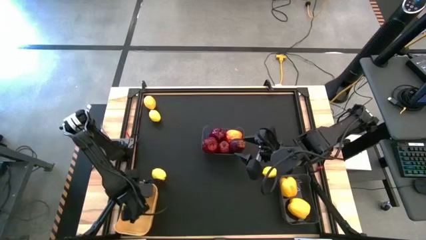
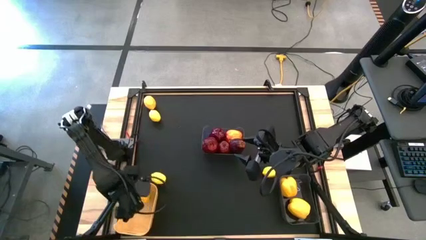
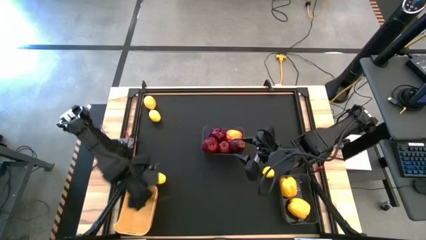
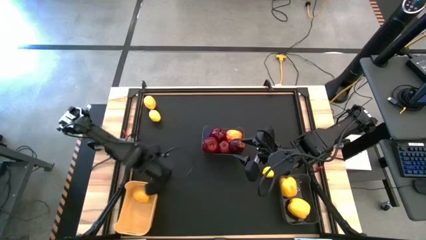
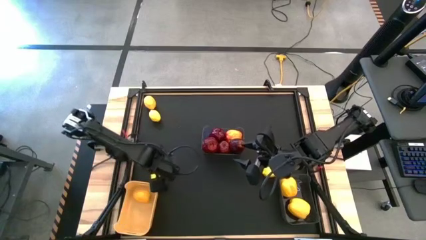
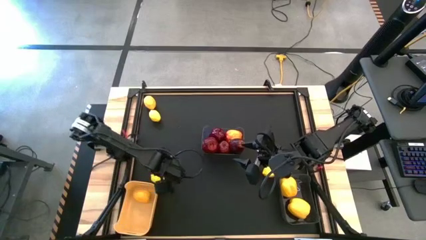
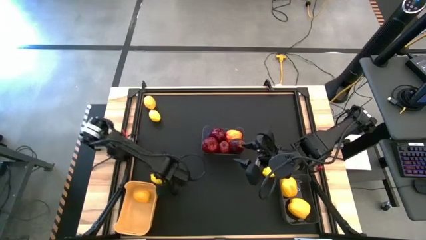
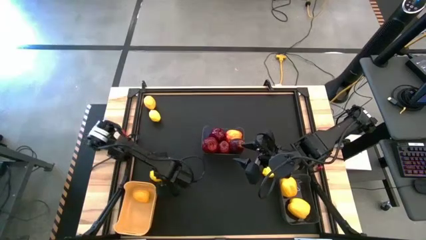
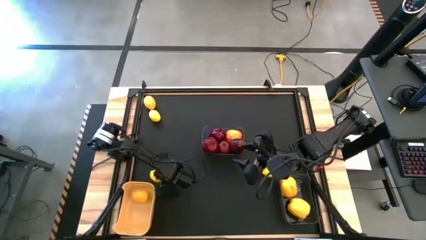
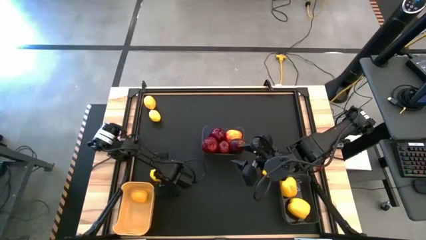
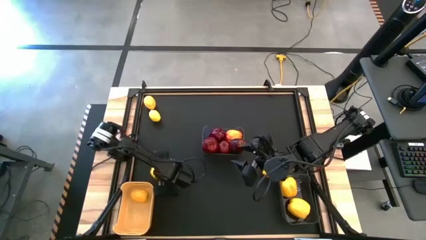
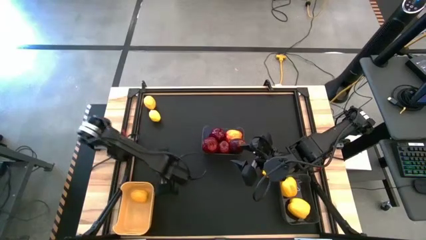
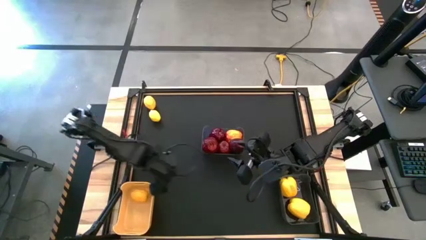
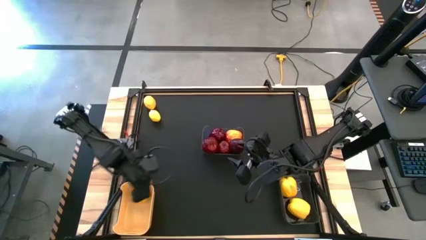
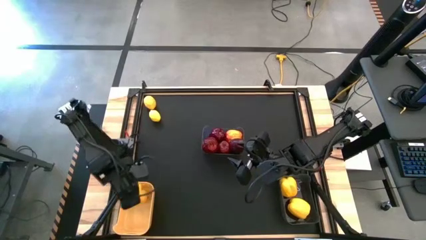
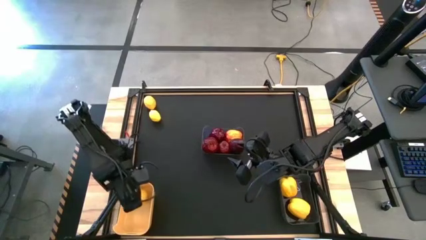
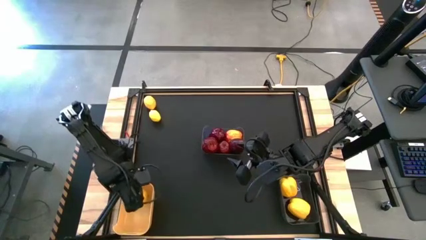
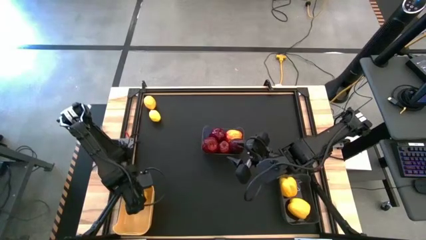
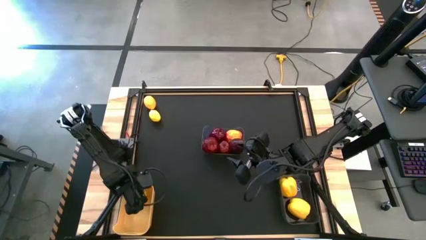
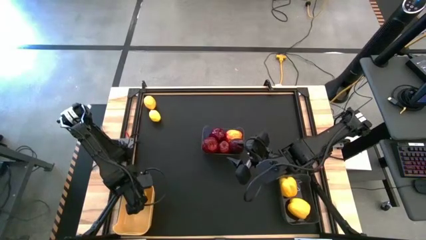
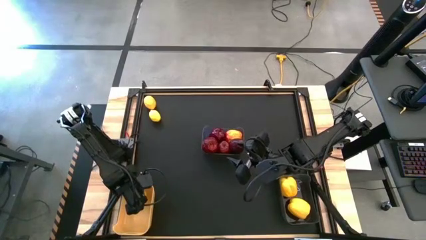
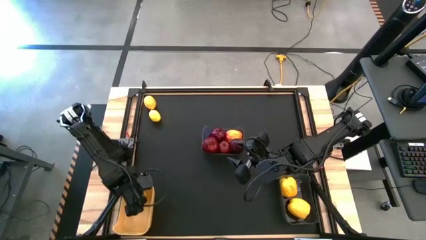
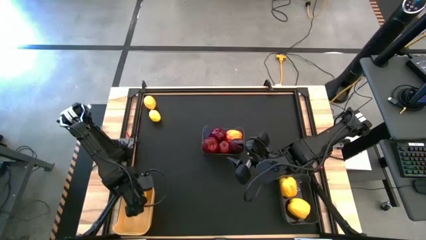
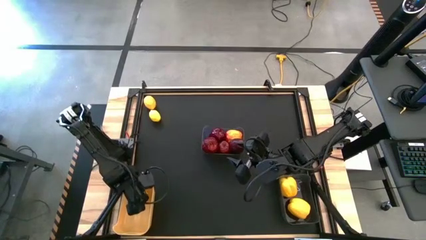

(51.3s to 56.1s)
Task: Sort produce into baskets
Put the yellow lemon into the yellow bin

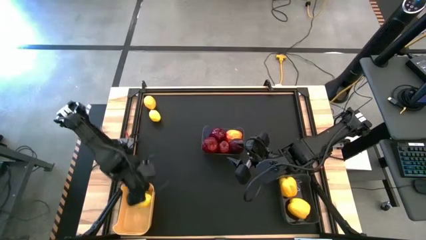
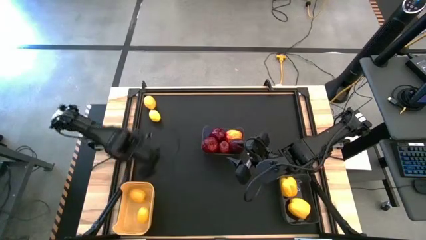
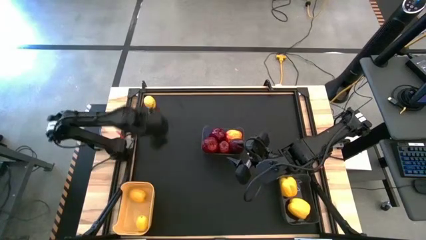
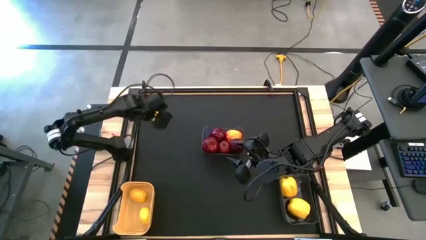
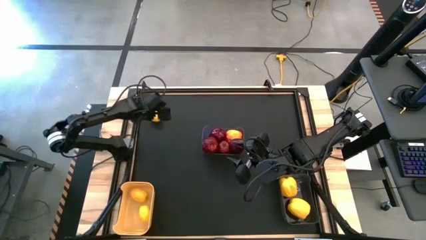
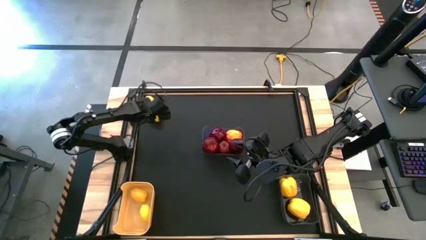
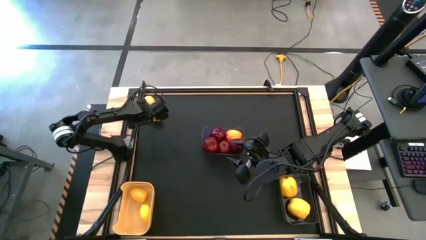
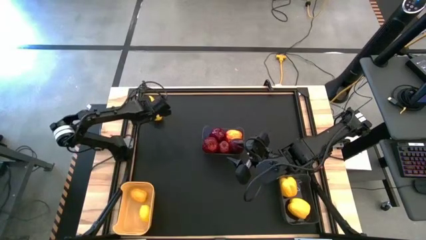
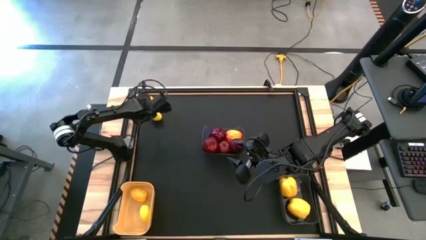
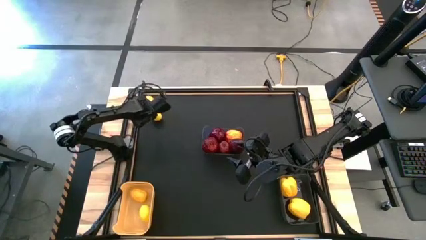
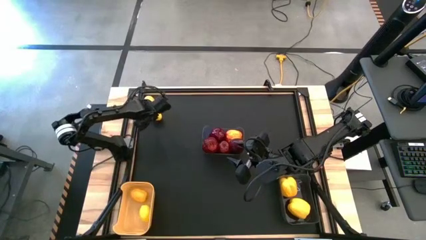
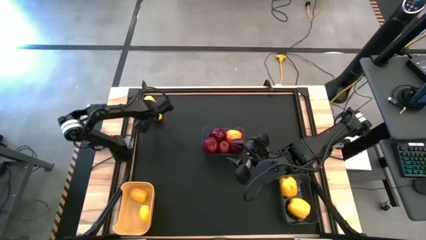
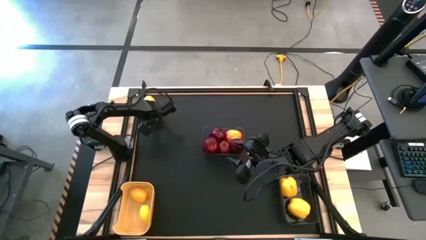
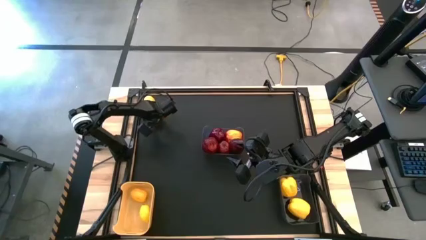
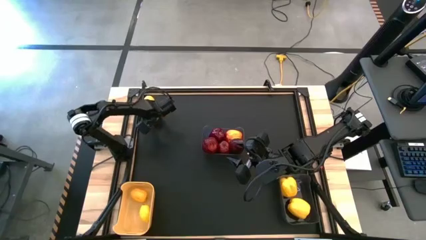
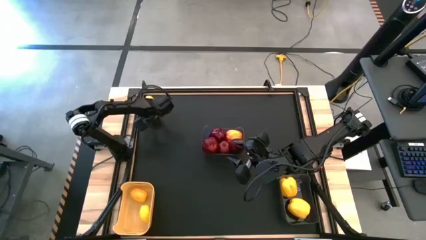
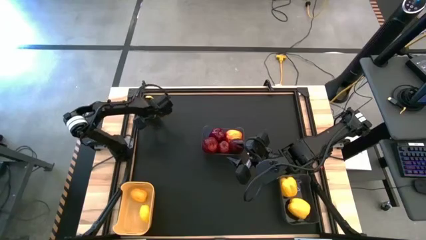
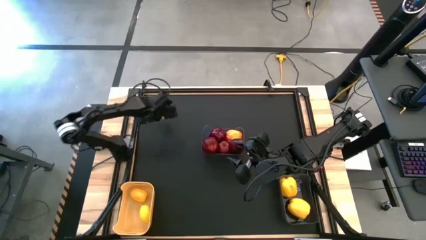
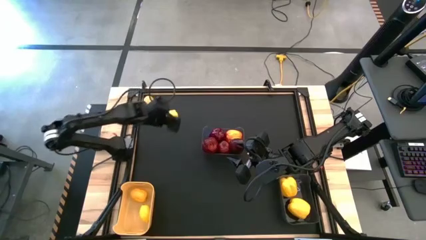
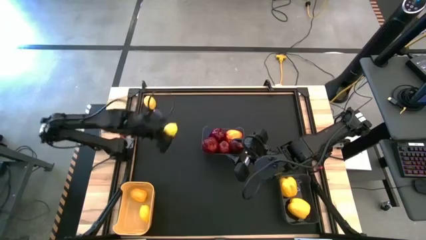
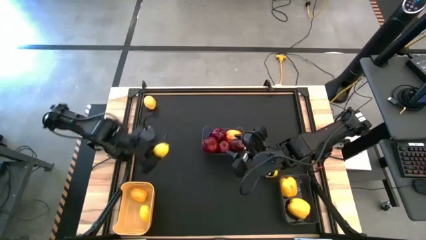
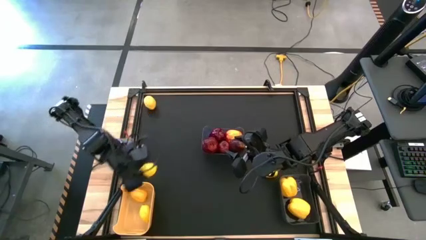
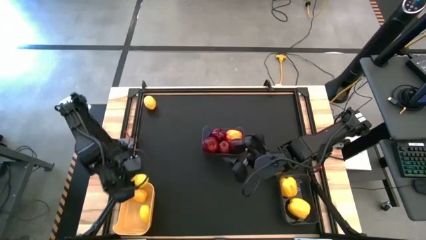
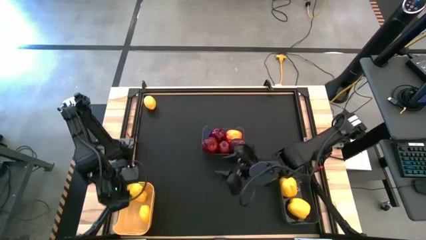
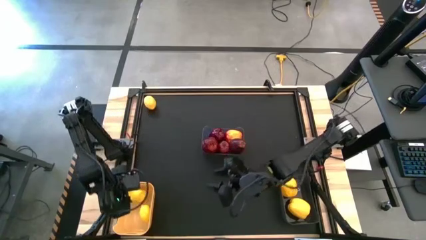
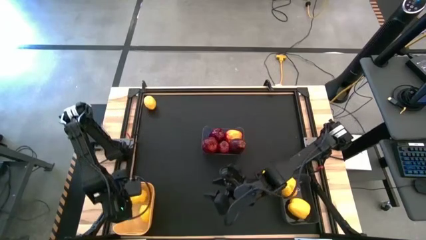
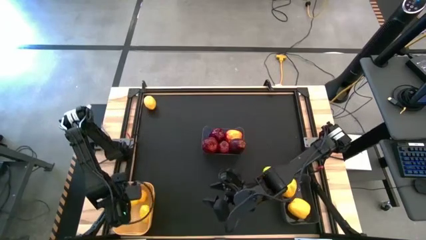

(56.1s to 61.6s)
Put the yellow lemon into the yellow bin

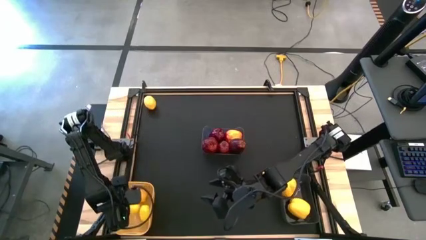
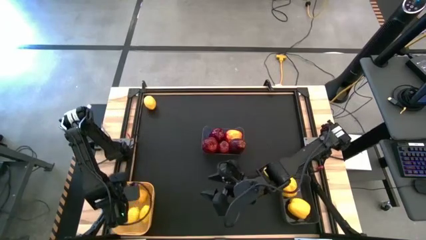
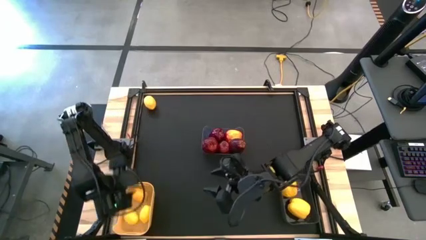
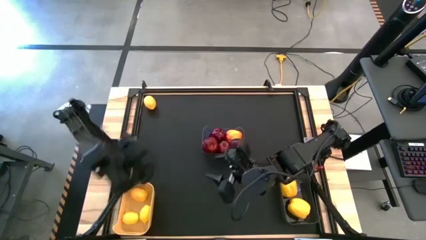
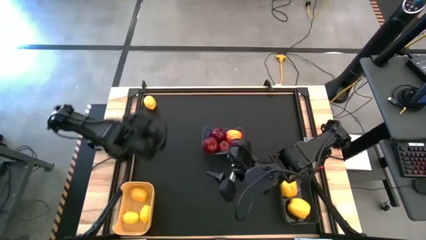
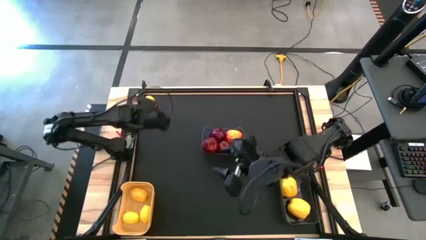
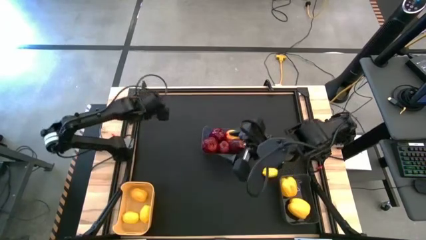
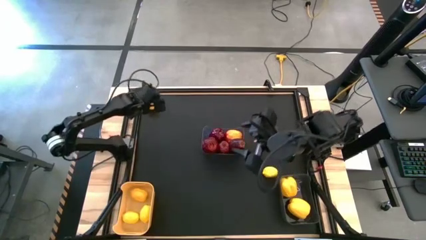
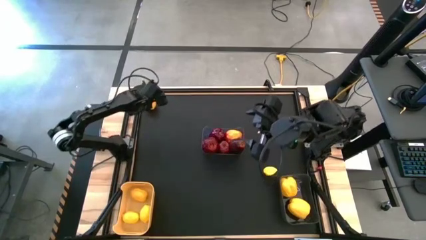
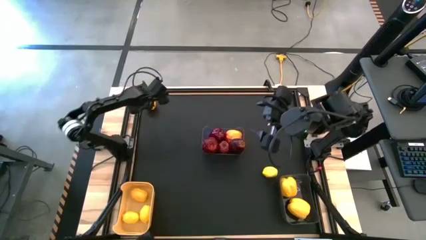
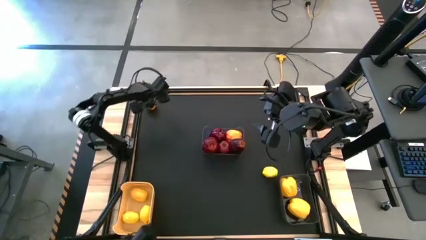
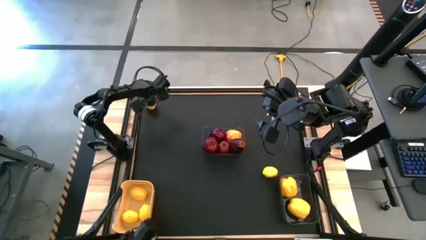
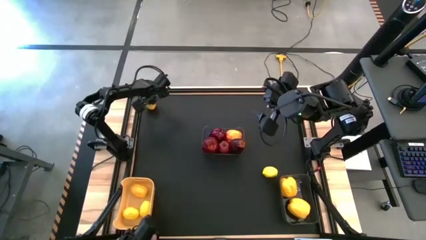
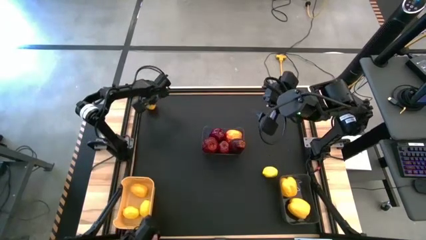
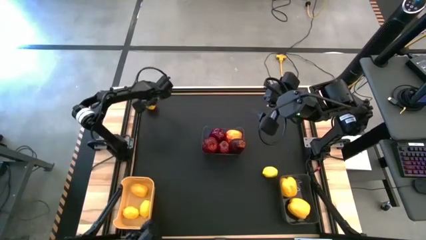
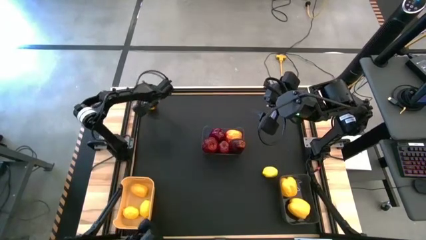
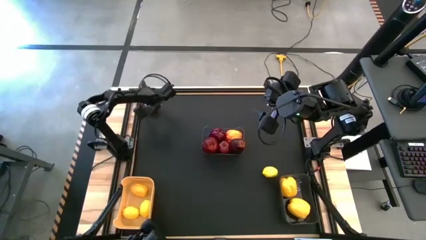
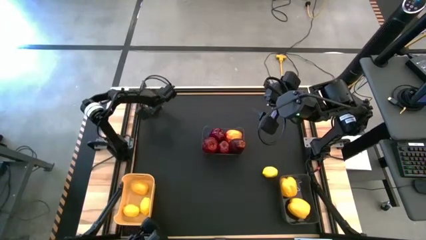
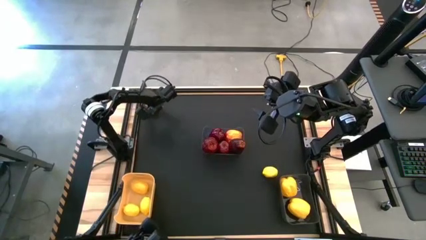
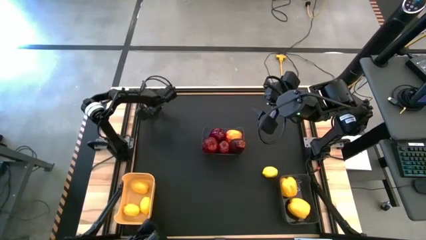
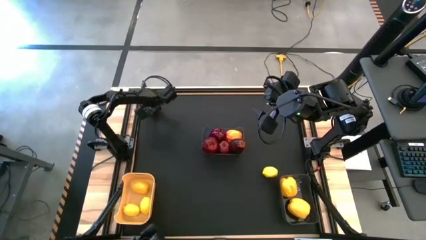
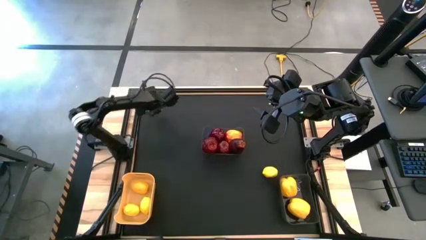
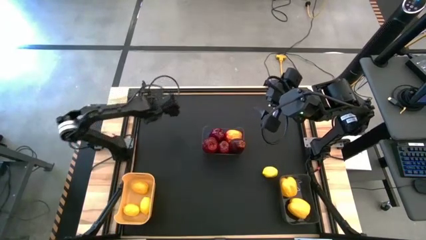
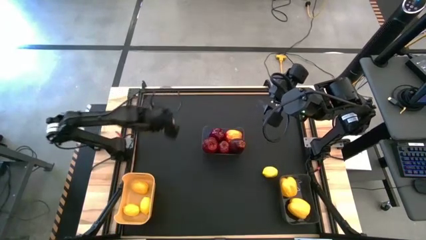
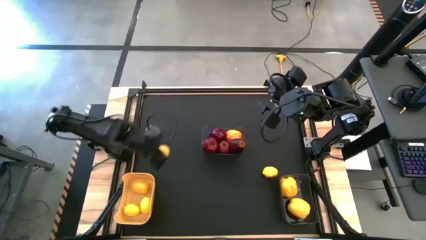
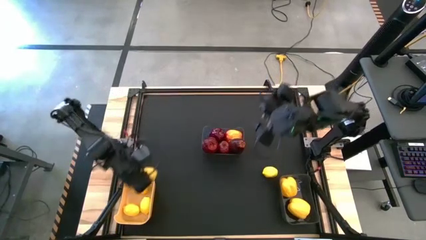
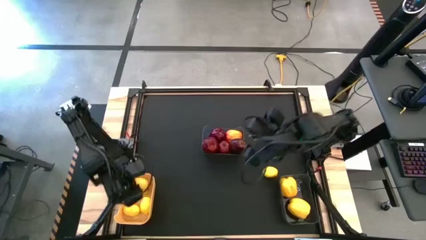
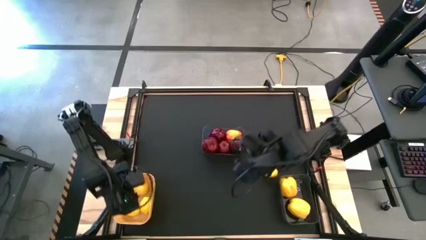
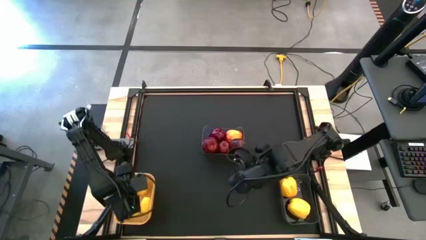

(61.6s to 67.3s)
Put the yellow lemon into the yellow bin
